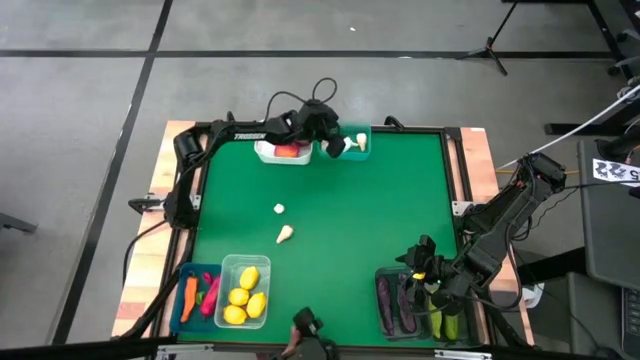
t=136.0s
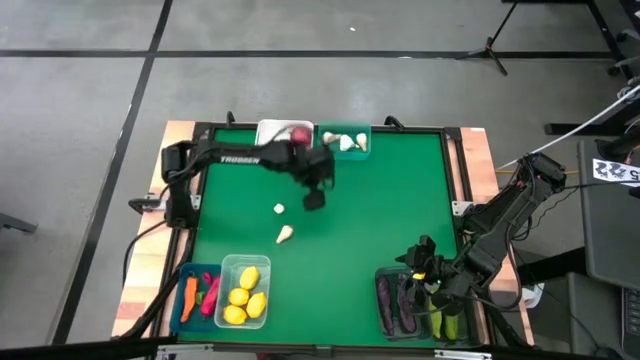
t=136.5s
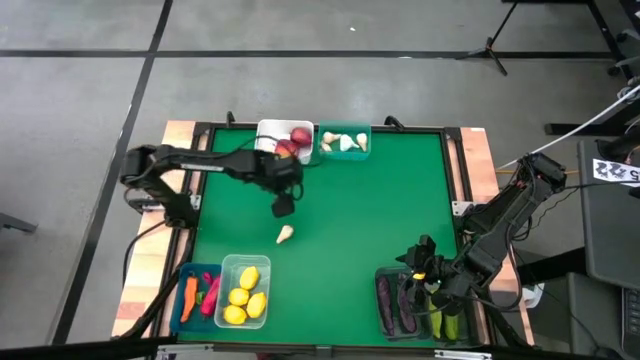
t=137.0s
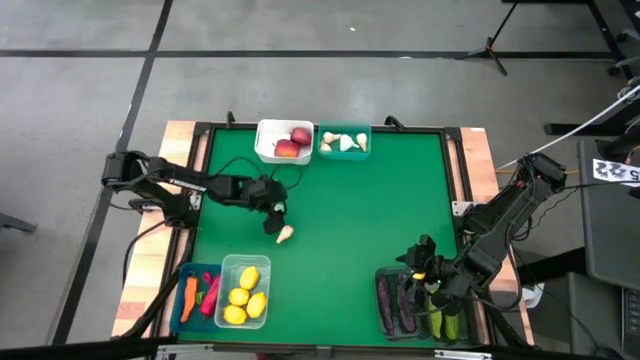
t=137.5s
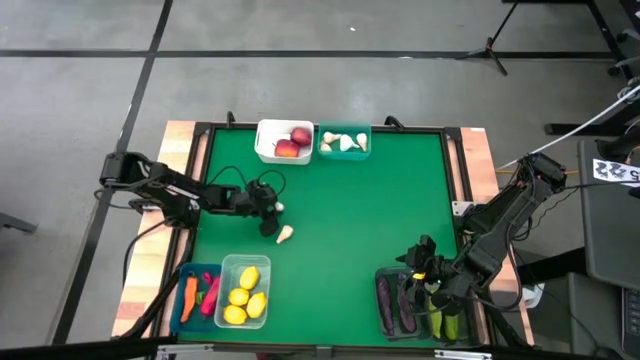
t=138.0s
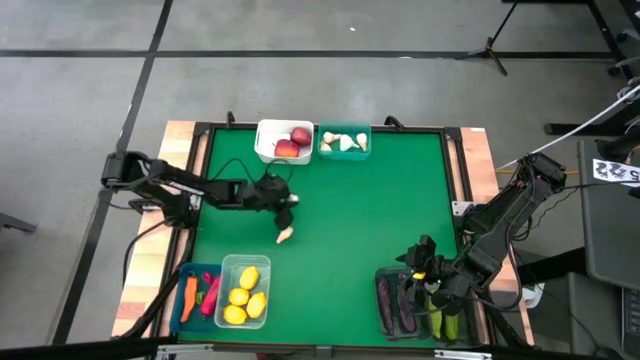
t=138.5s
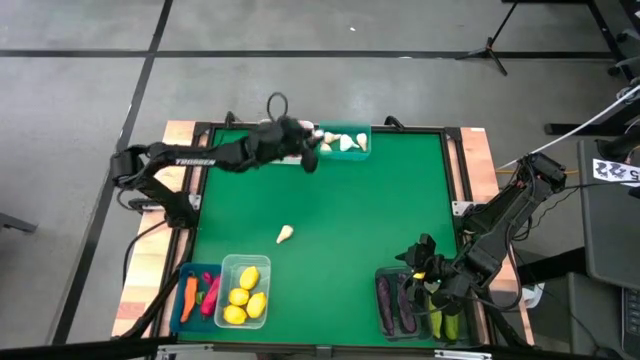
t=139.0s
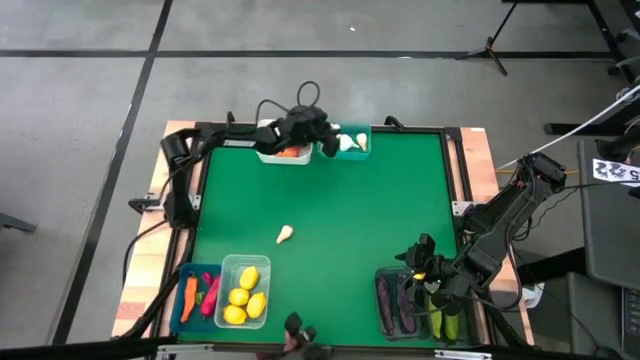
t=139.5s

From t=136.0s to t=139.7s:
Task: Sort produce into baskets
Put the white garlic into the green bin

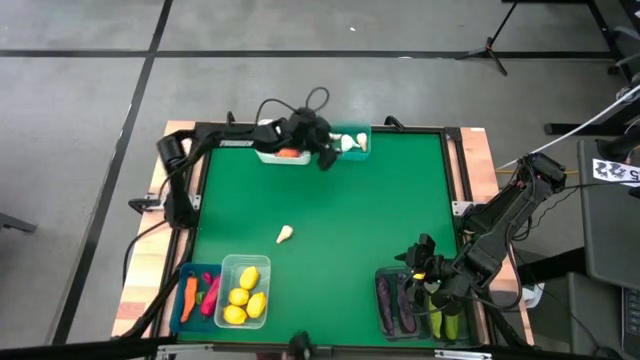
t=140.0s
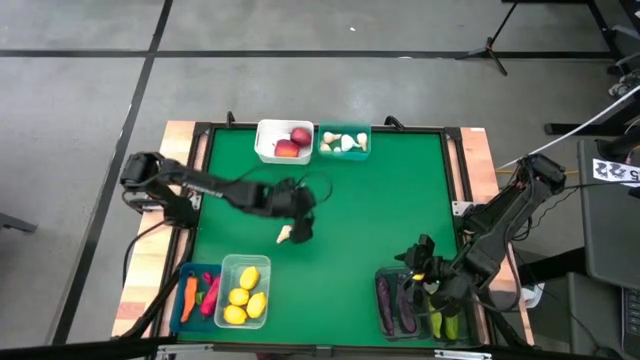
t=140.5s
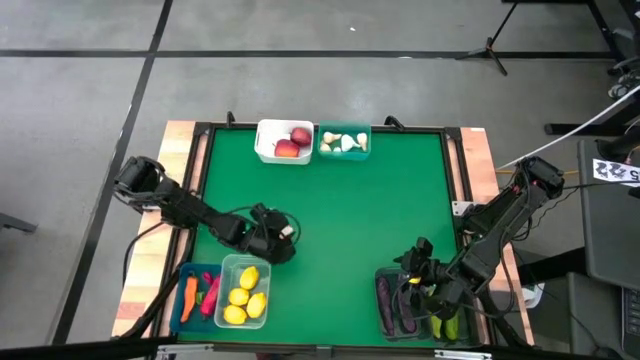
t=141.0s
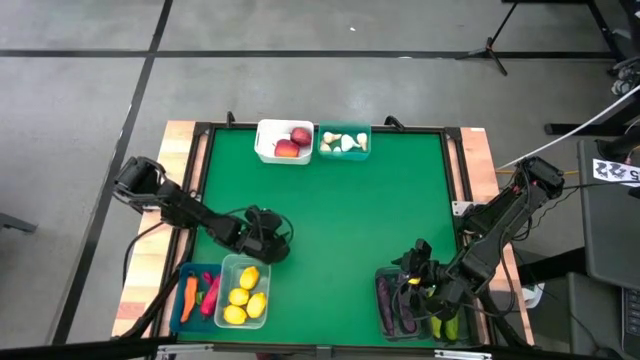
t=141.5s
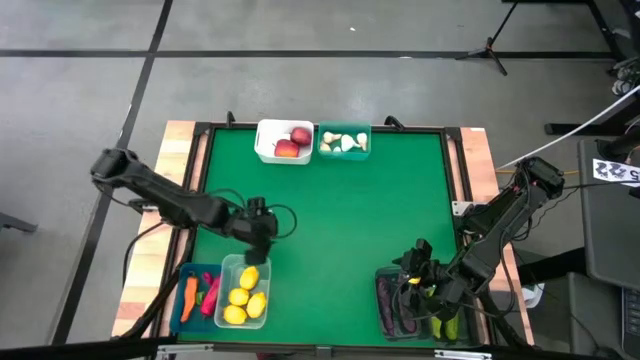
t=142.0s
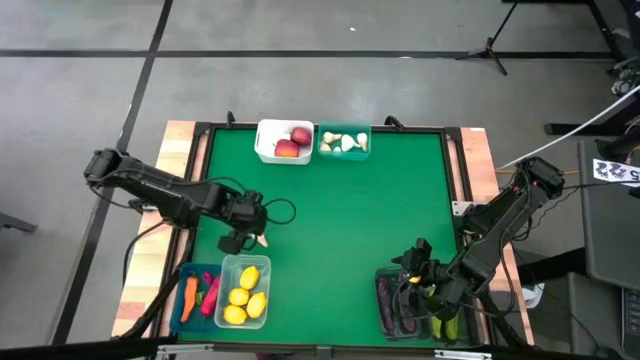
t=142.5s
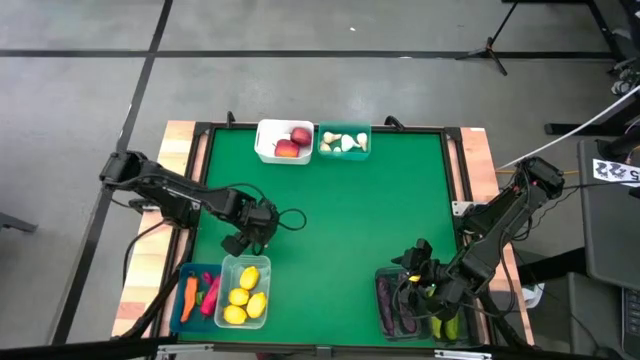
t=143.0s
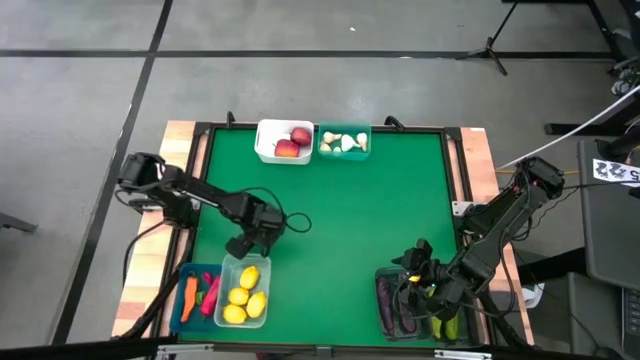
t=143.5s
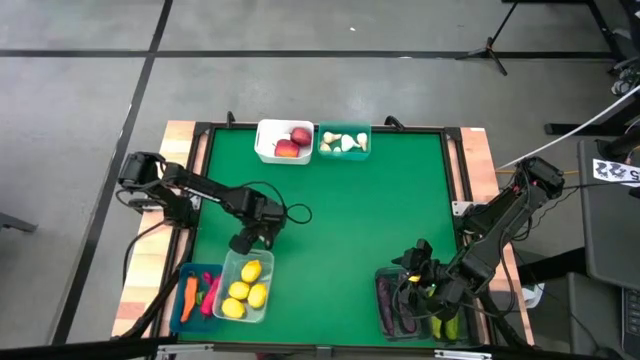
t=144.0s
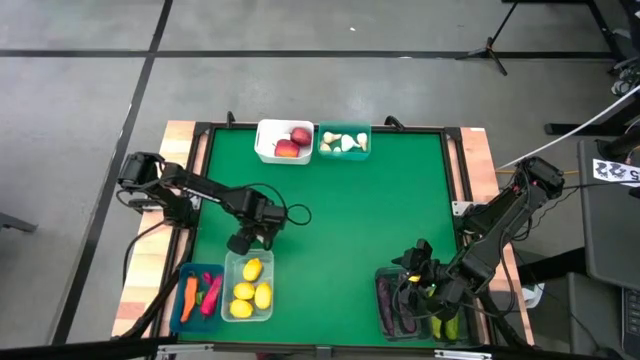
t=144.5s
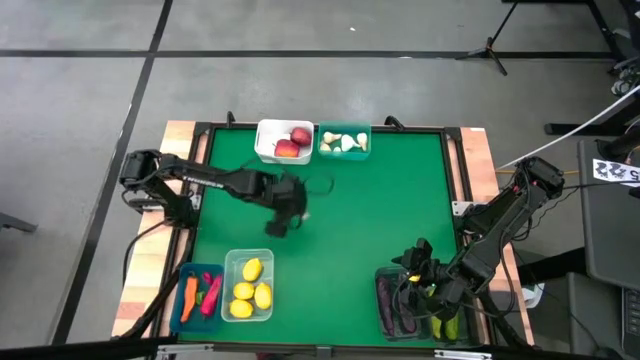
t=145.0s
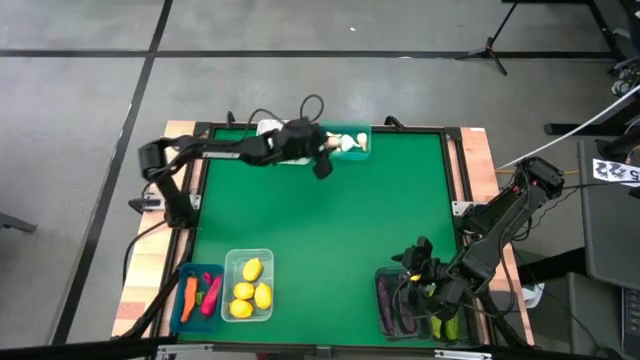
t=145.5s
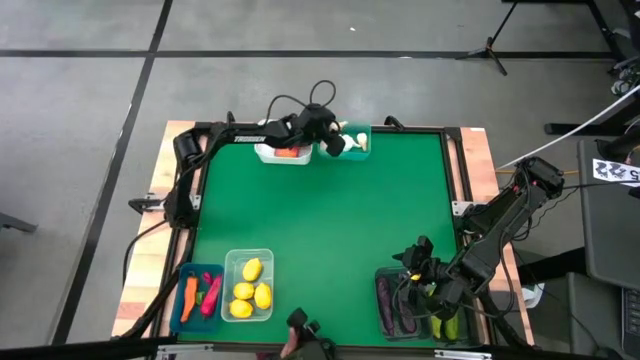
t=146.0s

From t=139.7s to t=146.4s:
Put the white garlic into the green bin

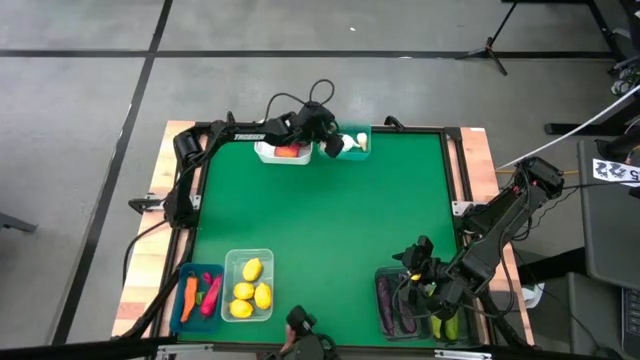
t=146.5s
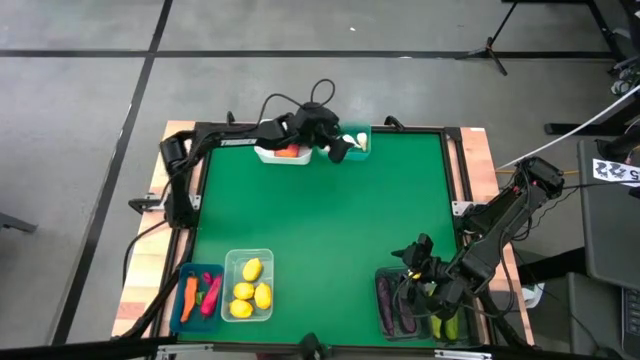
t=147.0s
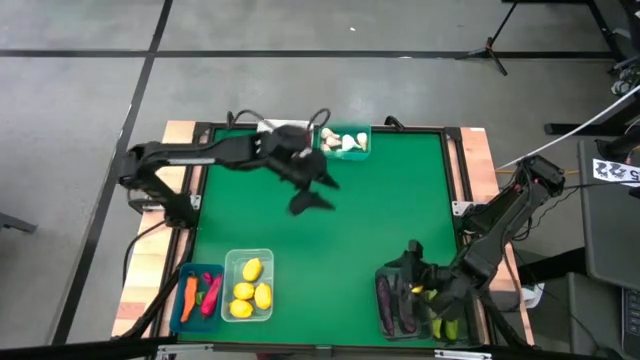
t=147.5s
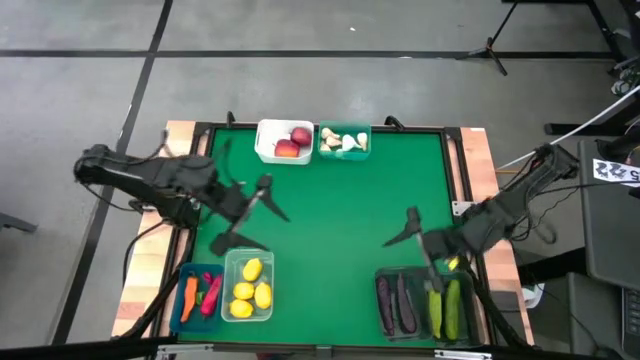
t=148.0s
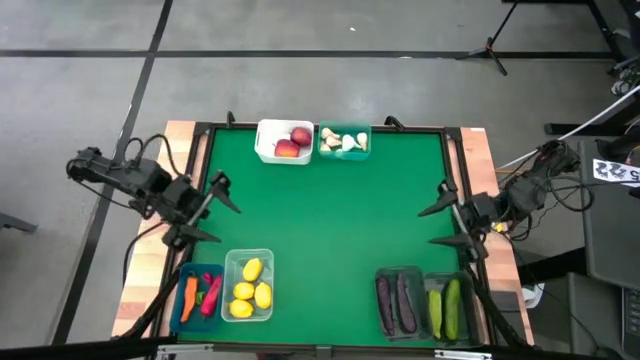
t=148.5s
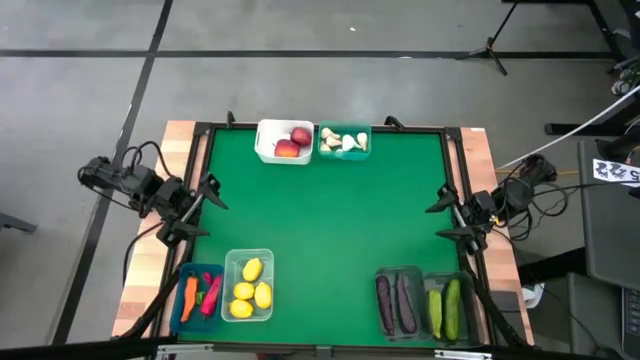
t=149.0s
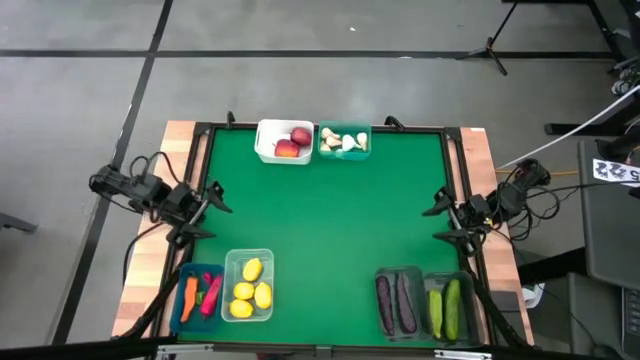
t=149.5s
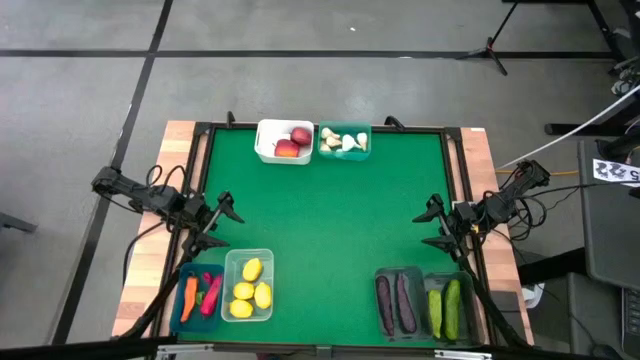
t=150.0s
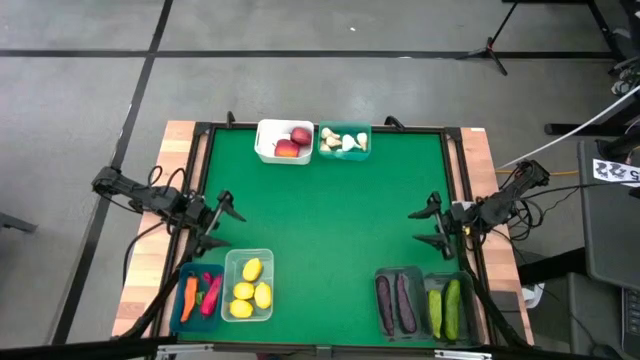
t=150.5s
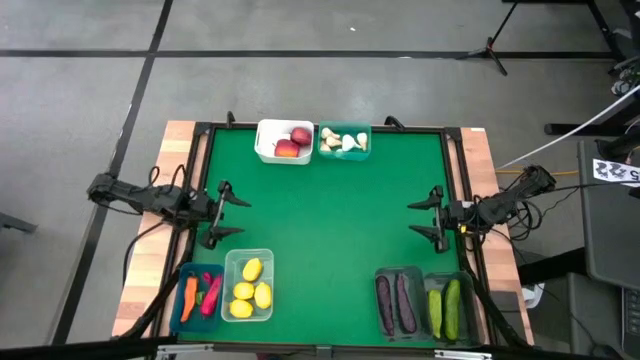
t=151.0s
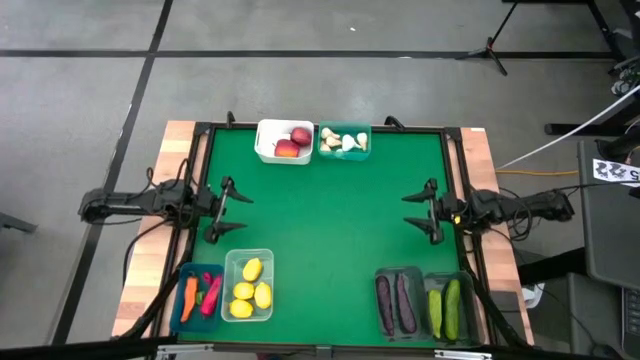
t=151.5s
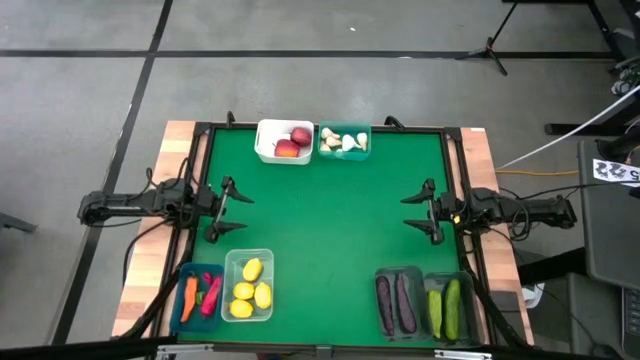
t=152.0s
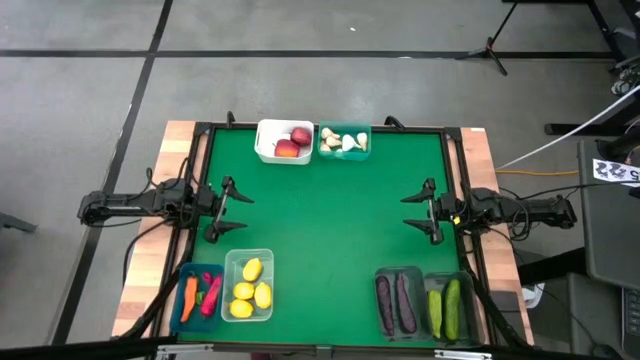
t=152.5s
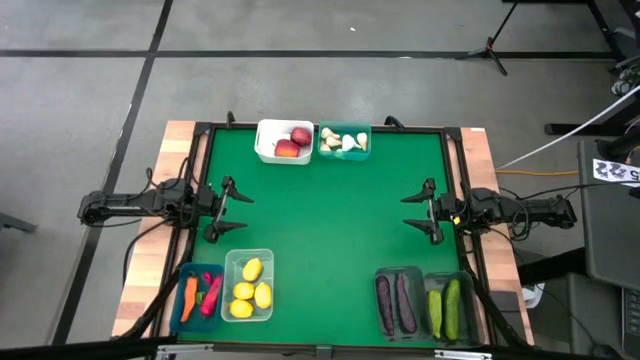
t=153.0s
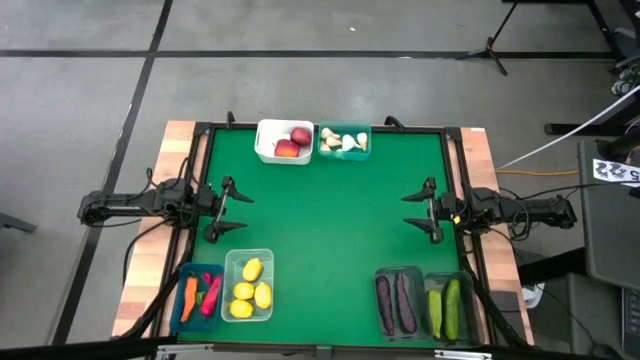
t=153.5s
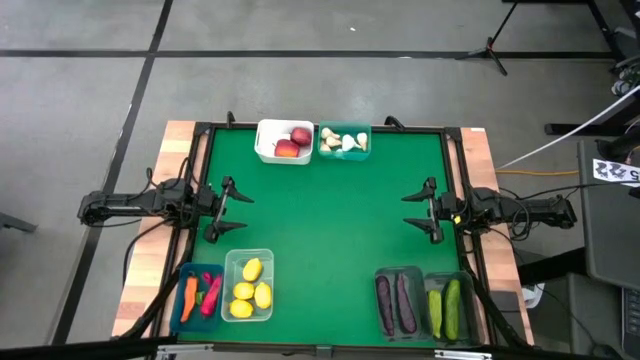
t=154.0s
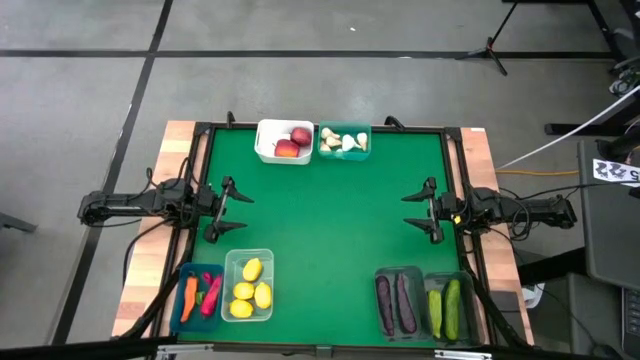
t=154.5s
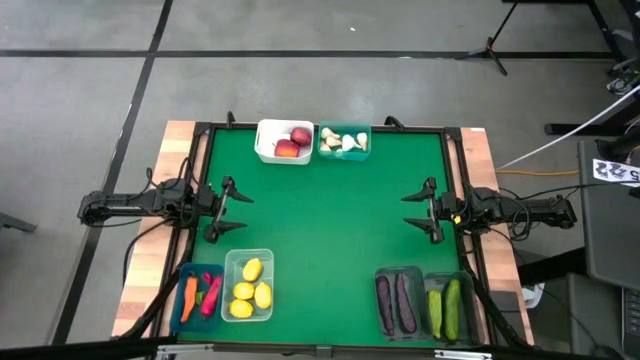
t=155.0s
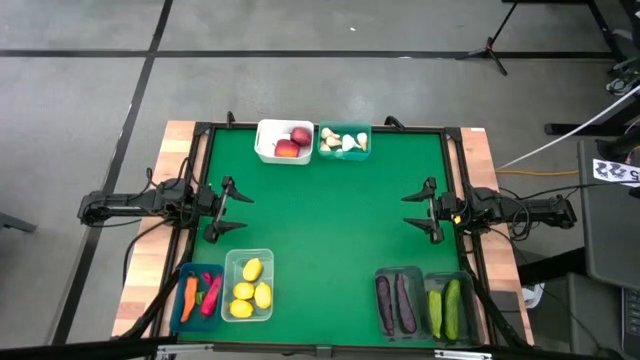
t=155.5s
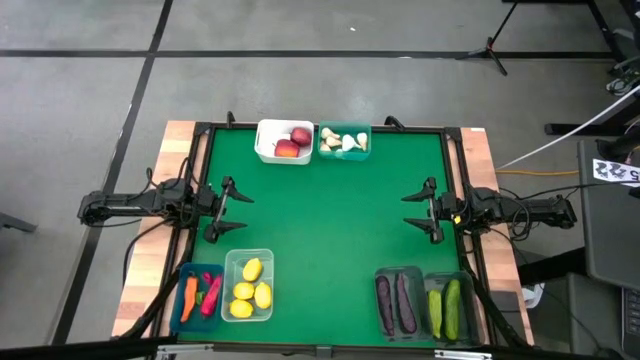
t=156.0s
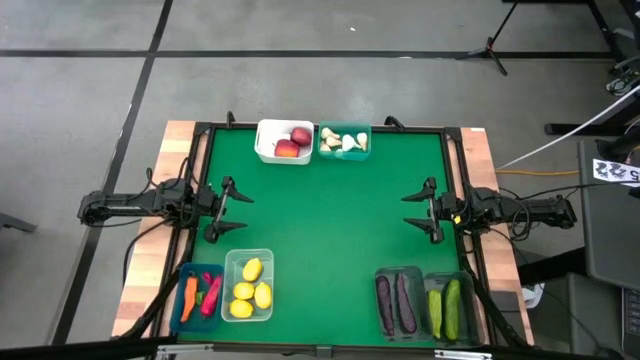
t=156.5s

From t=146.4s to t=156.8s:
Return to Home Position

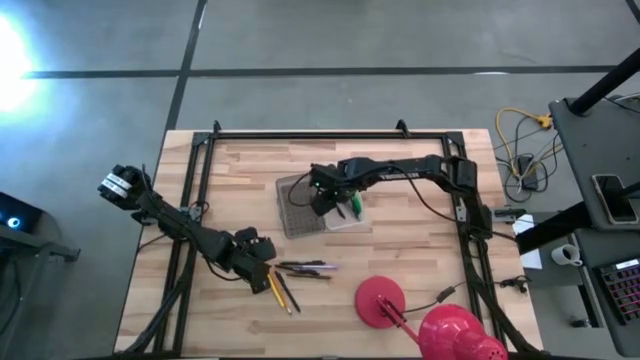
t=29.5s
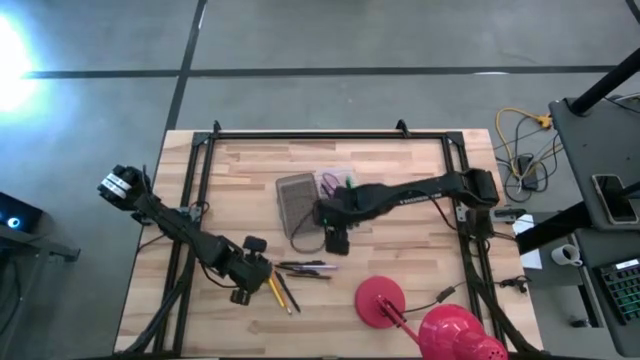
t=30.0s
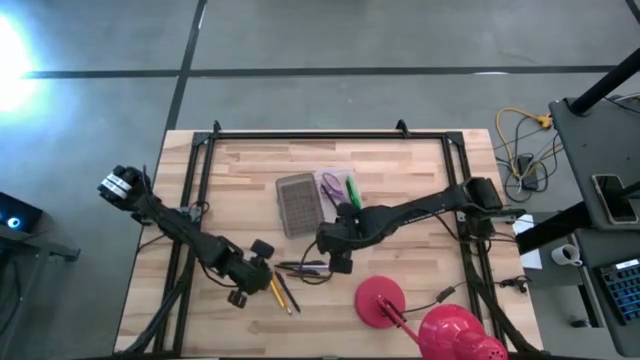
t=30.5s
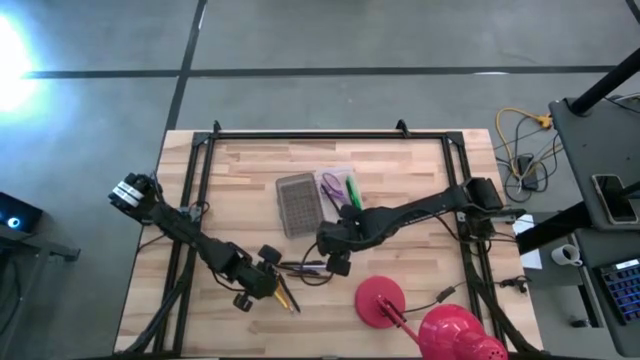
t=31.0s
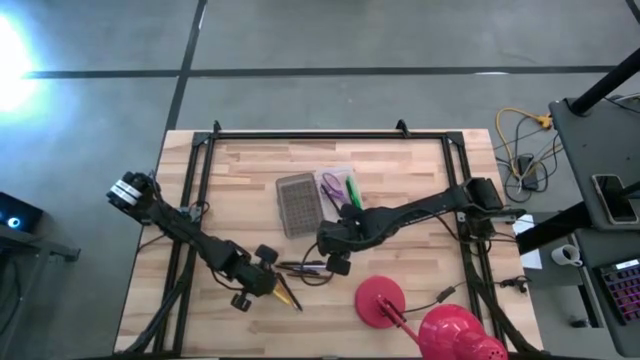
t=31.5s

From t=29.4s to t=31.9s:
Task: Pick & place school supplies into a supply box
Put the yellow pen into the black supply box
